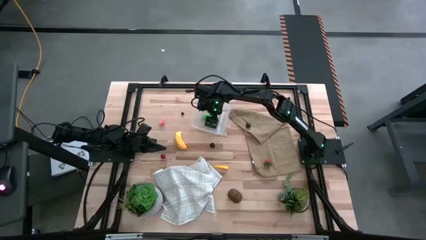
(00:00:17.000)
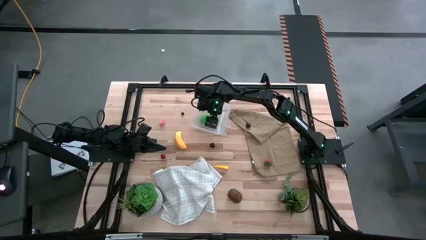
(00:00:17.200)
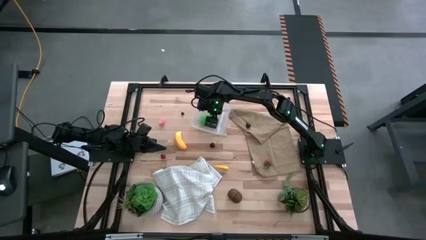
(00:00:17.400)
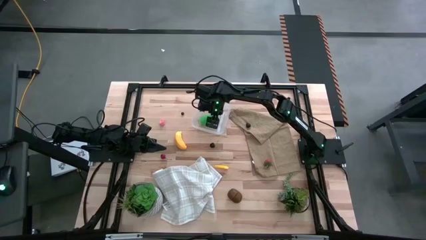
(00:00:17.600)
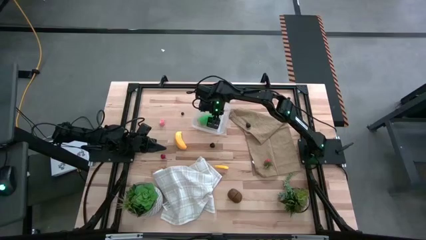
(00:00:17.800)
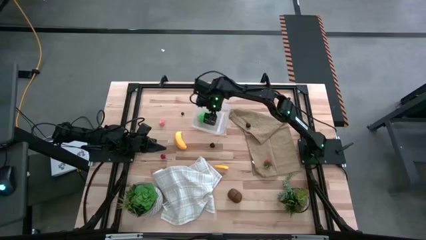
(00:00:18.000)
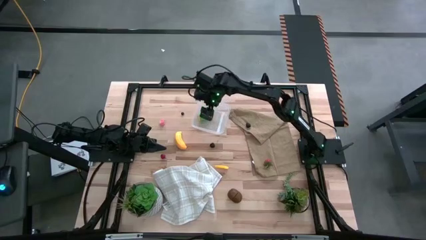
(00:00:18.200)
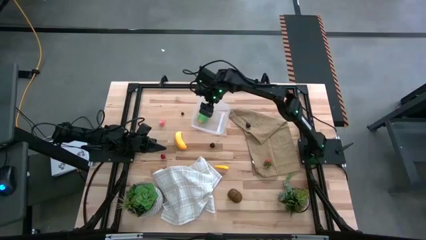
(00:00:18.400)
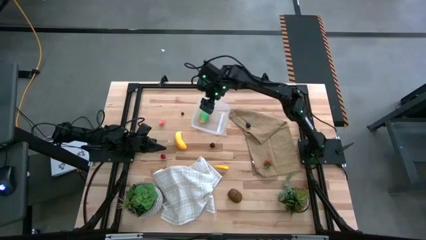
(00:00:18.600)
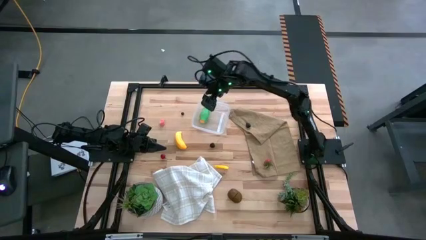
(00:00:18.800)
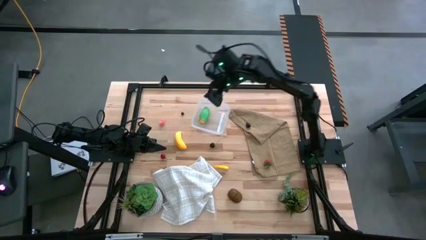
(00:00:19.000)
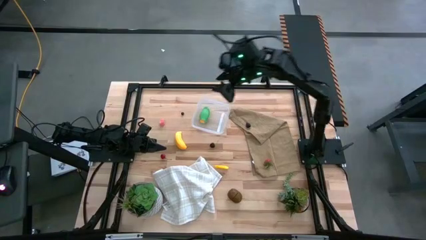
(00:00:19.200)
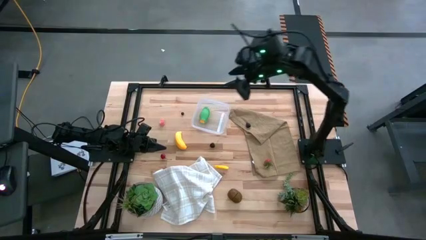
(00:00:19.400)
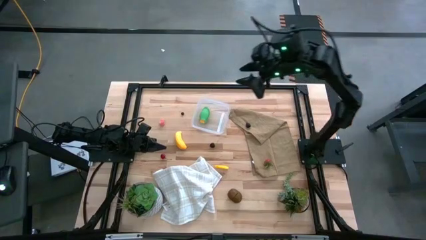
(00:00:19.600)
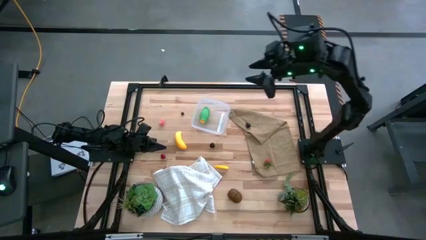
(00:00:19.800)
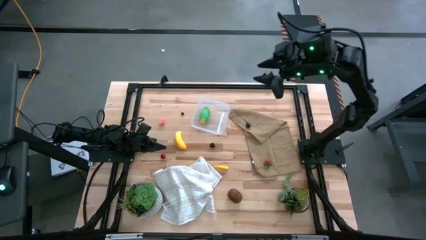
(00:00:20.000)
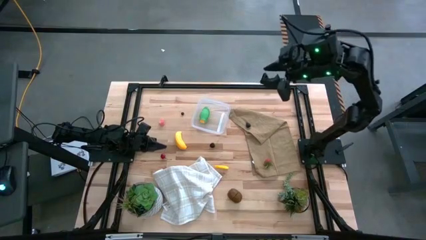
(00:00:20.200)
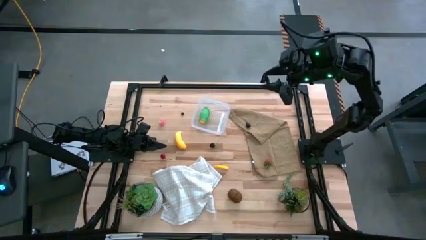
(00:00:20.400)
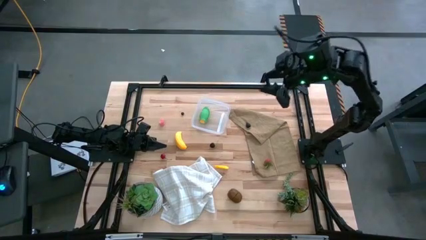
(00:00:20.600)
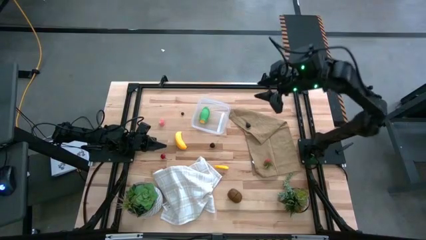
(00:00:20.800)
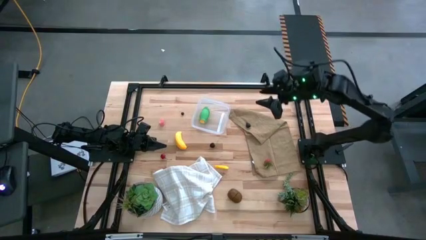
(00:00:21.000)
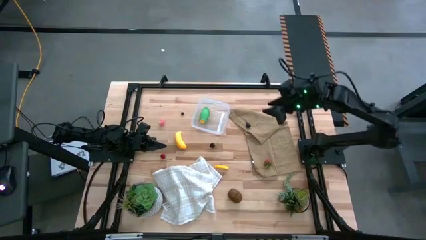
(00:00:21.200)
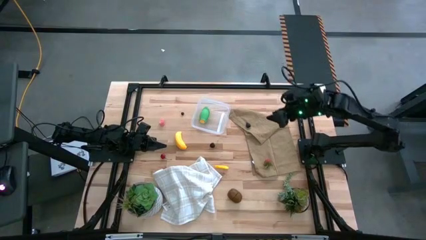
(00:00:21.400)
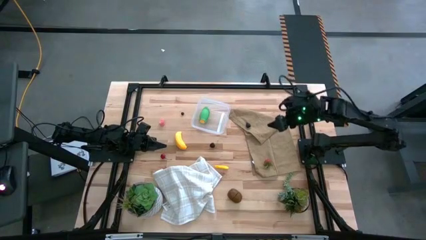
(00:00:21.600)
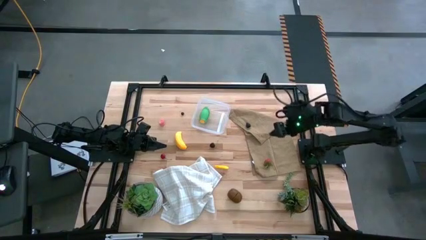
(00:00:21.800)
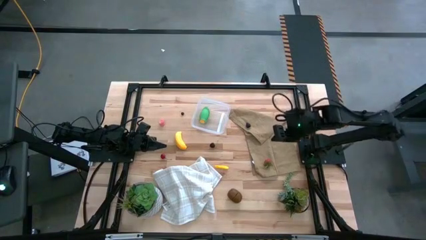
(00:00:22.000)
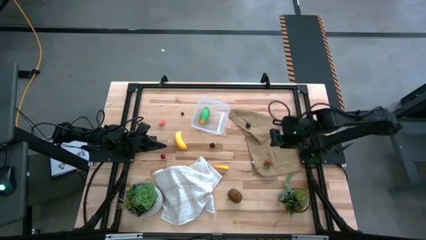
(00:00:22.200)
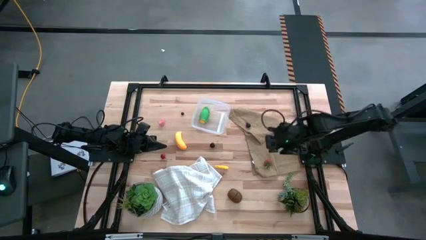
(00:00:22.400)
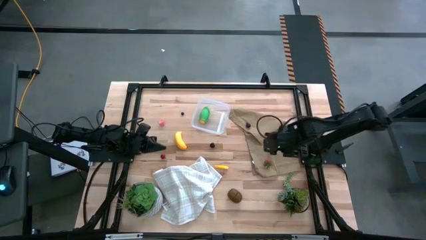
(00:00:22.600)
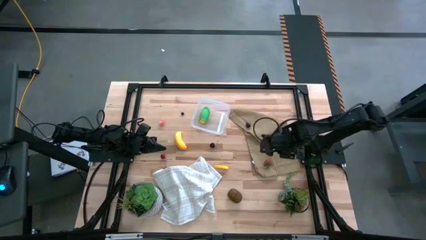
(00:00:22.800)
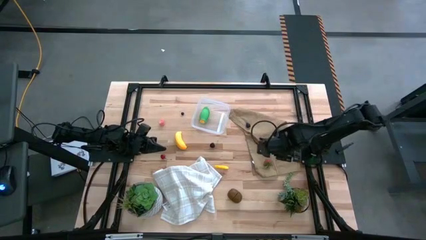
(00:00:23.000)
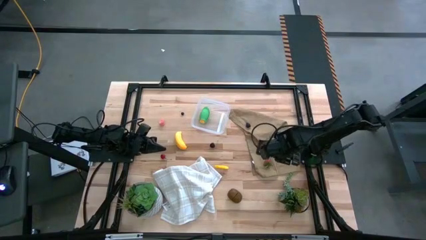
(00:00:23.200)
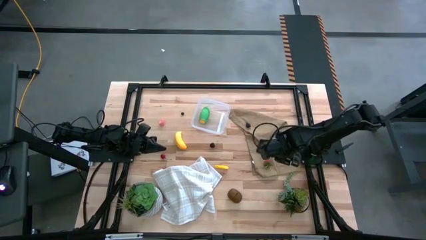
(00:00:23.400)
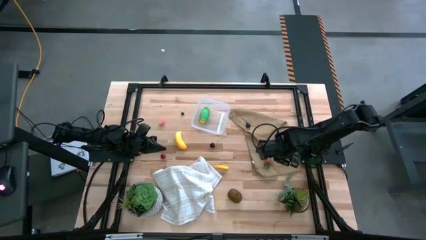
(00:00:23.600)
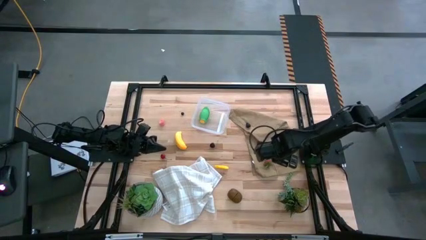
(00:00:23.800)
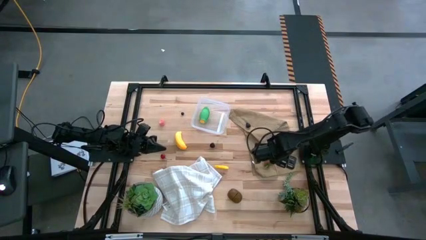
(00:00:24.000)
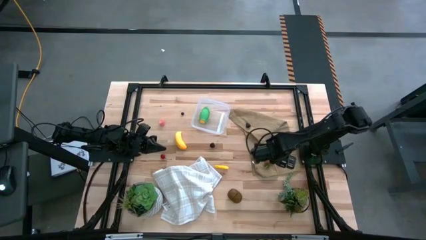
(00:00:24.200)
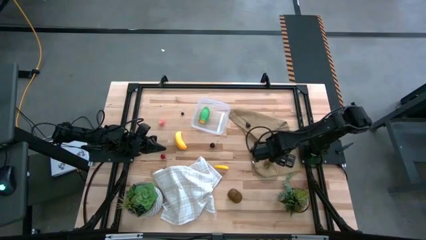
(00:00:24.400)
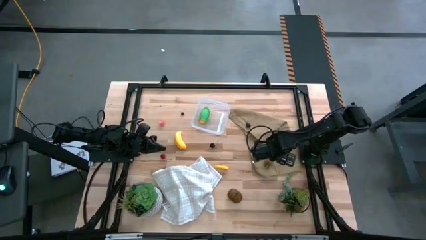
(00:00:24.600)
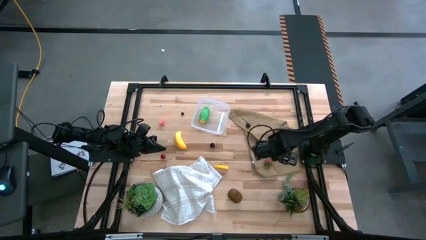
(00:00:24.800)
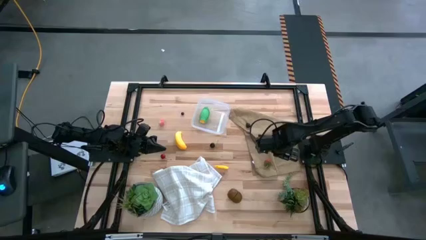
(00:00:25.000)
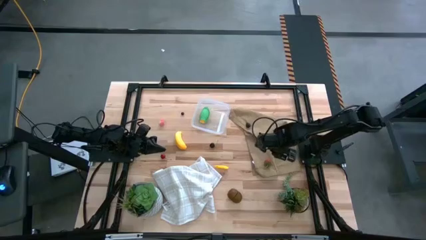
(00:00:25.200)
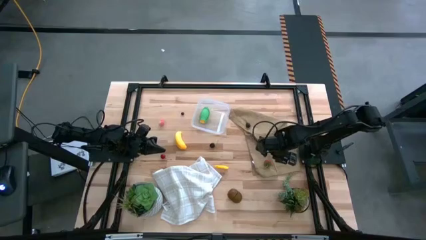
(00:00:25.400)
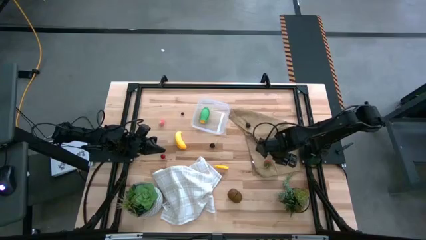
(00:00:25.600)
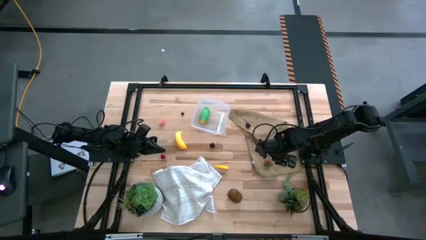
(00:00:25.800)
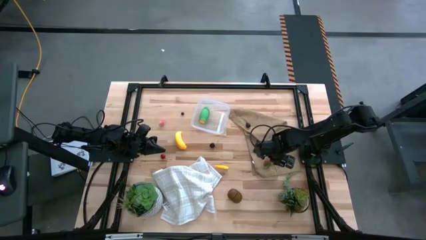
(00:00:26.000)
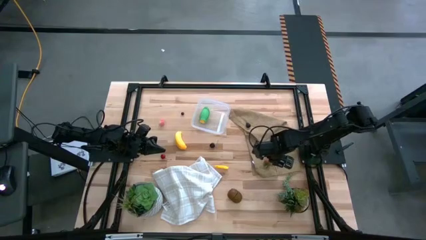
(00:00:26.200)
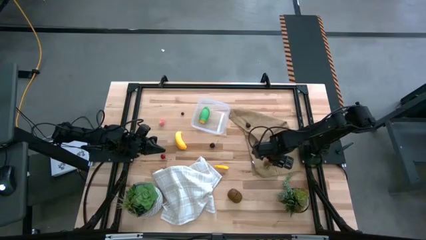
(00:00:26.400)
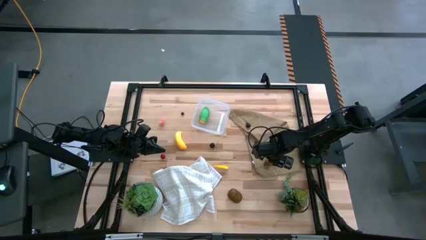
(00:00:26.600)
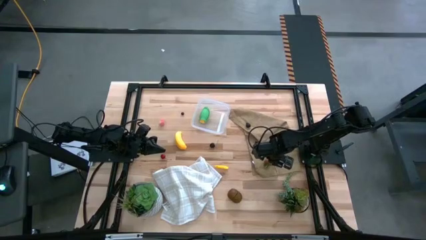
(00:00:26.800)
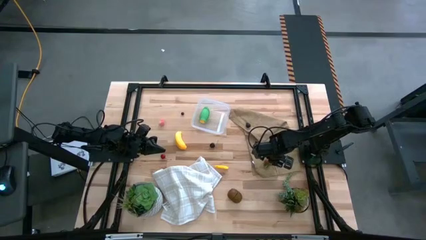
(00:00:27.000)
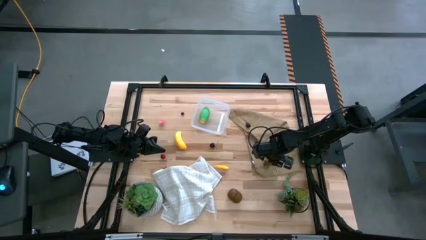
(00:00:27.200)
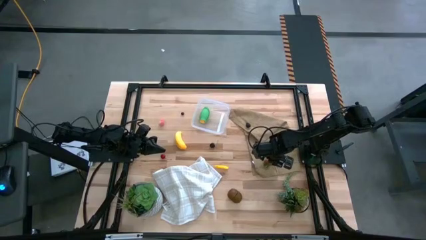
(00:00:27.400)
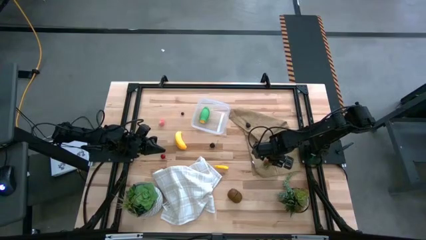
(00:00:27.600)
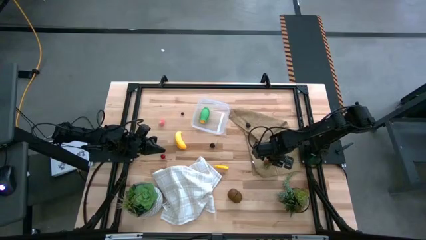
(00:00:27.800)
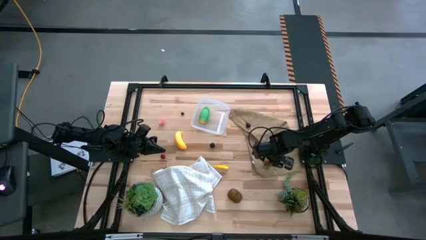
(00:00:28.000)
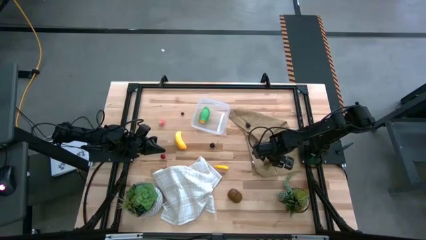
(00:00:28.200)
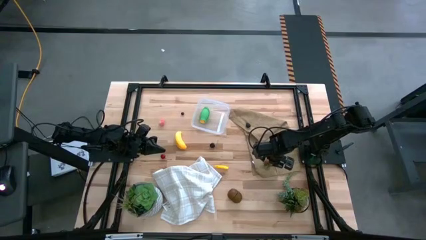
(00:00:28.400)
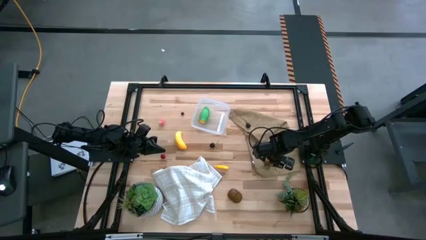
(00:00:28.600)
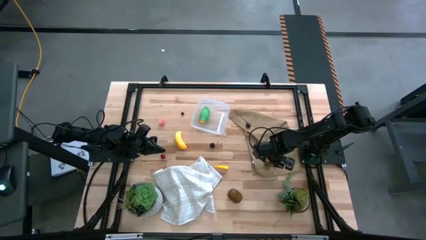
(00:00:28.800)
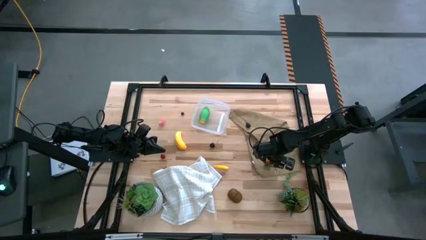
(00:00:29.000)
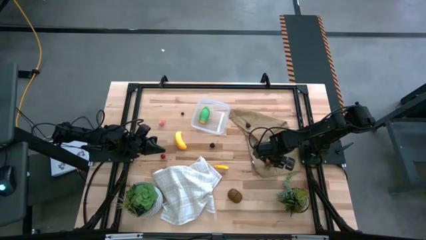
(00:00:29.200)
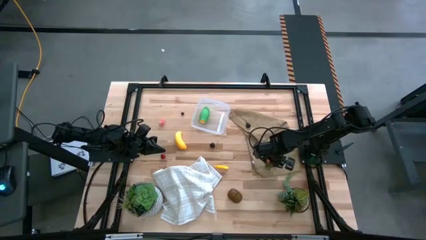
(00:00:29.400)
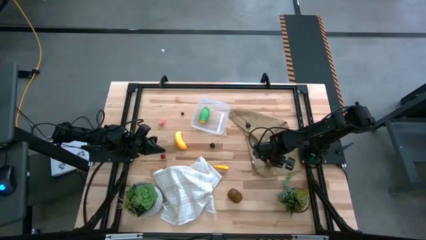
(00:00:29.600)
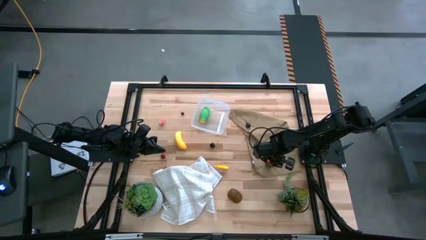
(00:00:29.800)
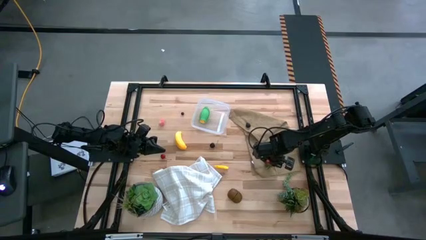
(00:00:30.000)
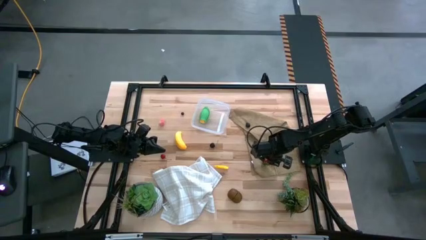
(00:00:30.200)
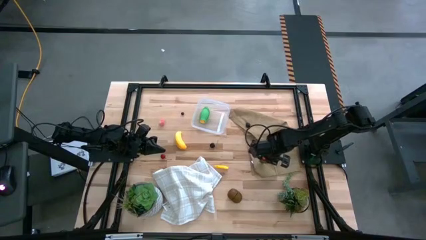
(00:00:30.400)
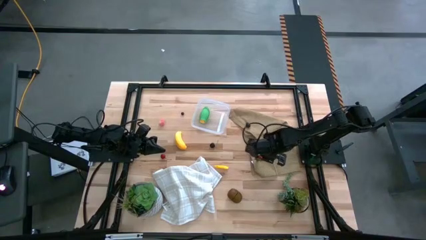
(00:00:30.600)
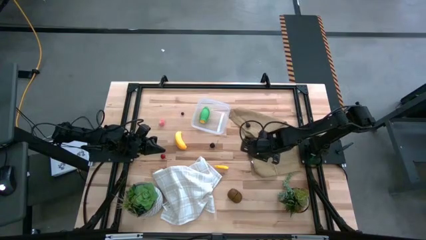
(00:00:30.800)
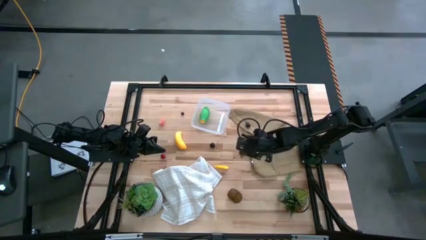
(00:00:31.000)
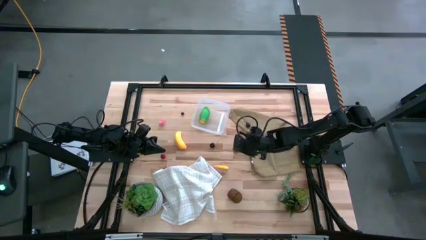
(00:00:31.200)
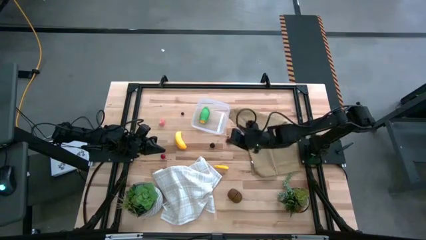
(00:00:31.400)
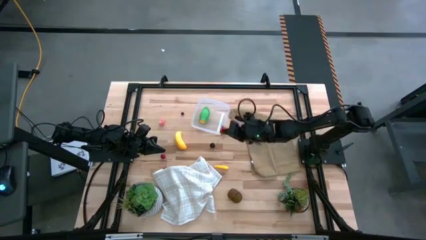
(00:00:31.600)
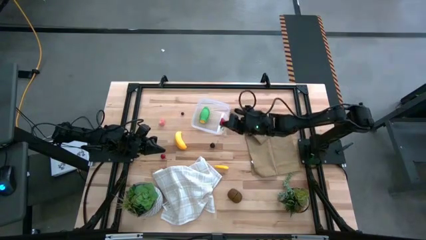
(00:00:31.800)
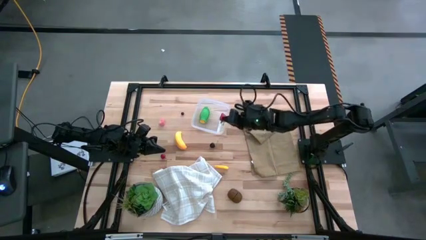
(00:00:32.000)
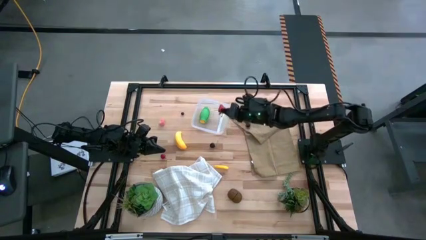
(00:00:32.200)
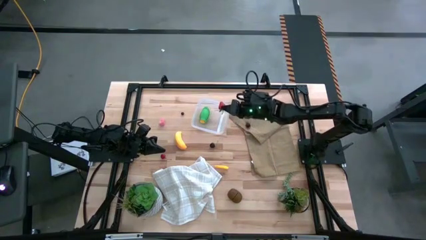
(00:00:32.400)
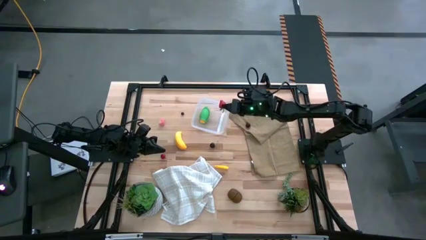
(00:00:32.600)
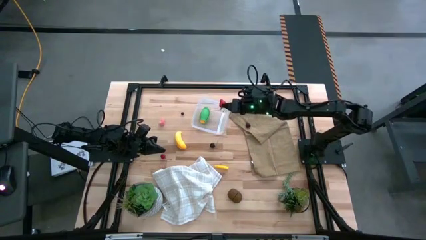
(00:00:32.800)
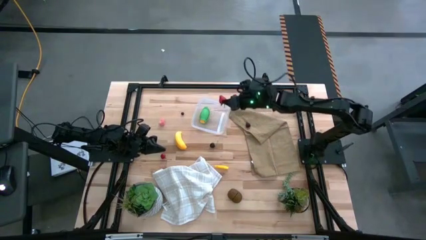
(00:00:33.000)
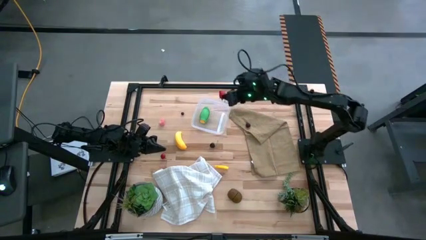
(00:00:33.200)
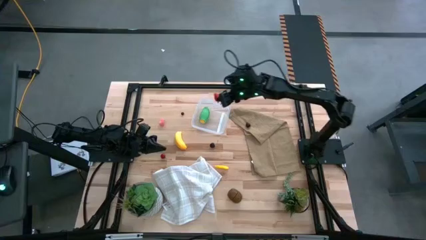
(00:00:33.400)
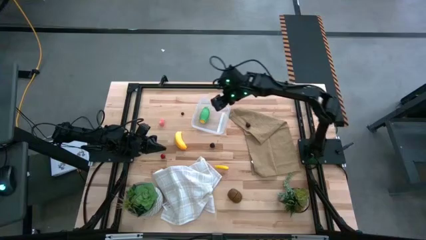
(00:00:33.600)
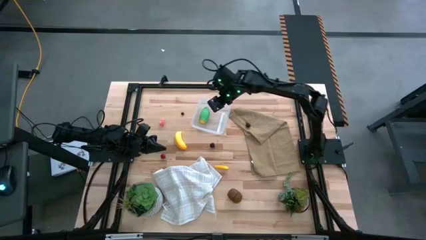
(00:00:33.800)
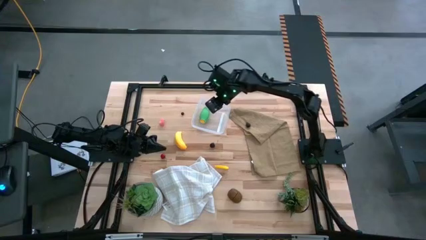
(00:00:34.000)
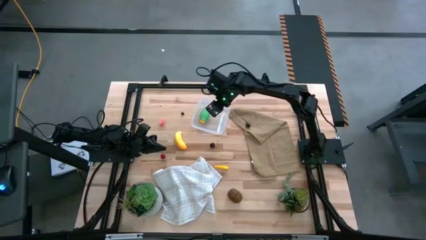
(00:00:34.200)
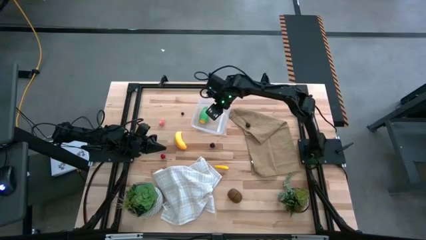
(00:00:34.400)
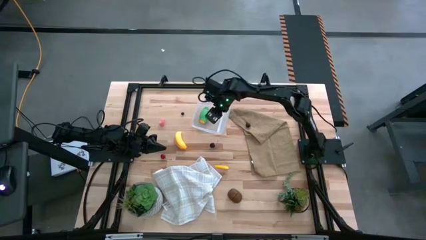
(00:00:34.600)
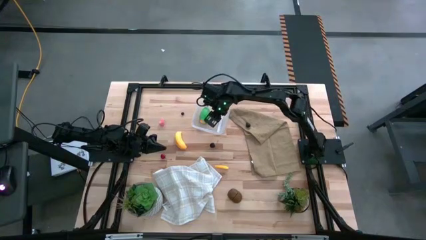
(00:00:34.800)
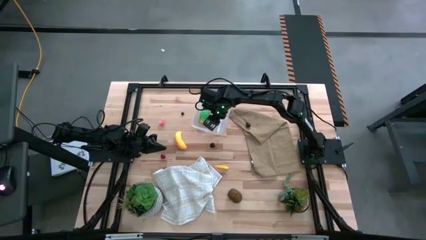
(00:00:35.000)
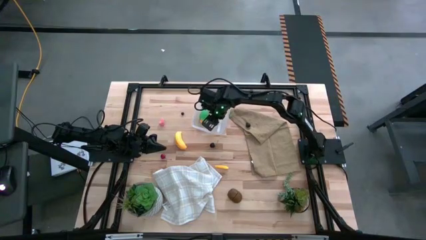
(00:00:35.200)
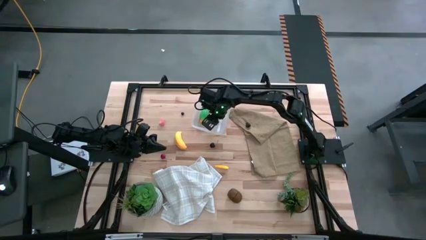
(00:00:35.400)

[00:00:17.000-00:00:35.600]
Task: Pick and placing Produce into tupperware
Put the red strawberry into the transparent bin
